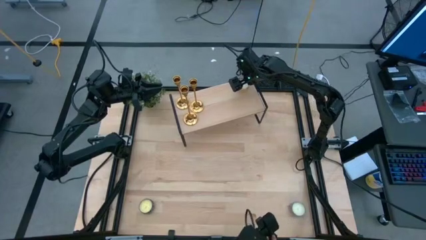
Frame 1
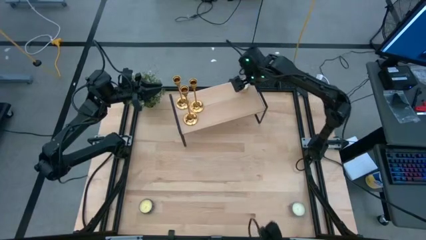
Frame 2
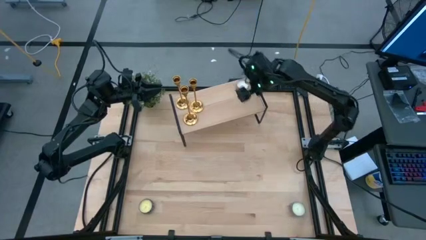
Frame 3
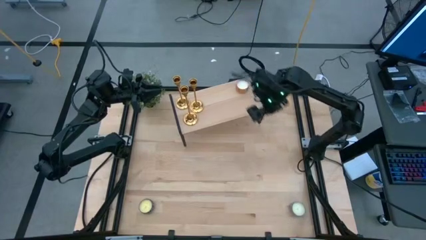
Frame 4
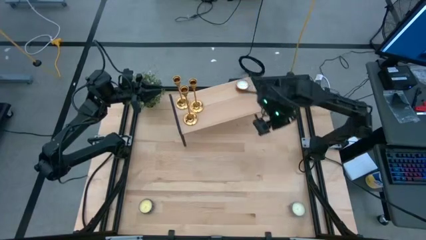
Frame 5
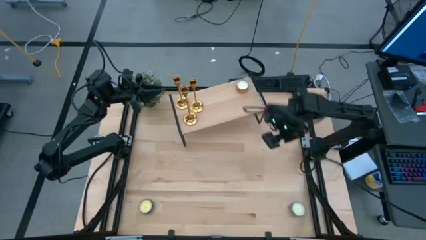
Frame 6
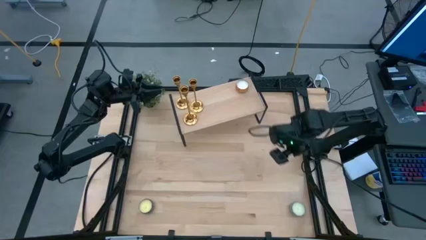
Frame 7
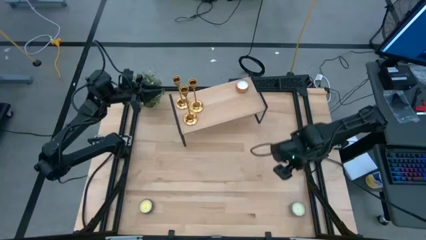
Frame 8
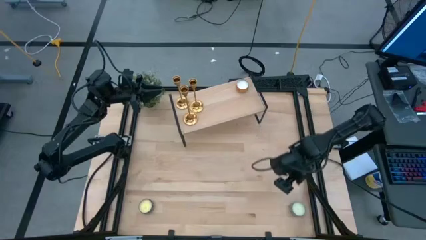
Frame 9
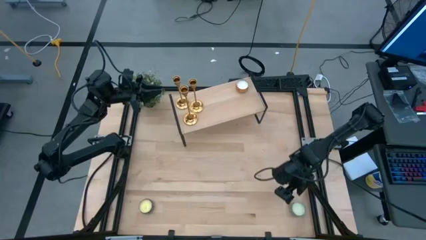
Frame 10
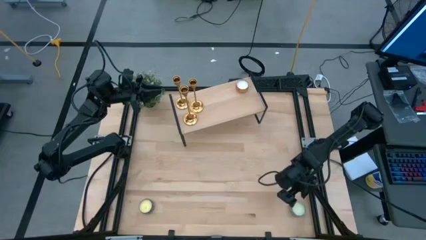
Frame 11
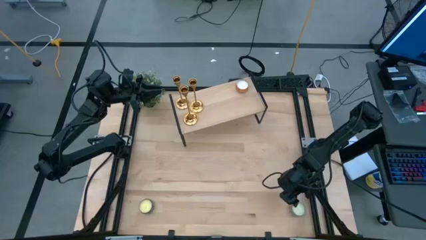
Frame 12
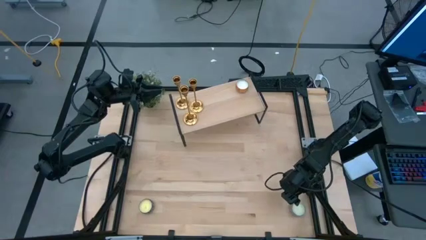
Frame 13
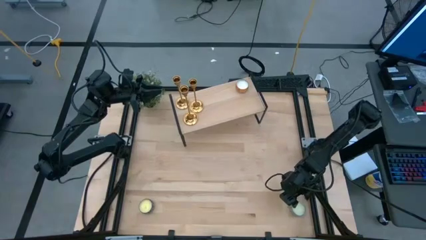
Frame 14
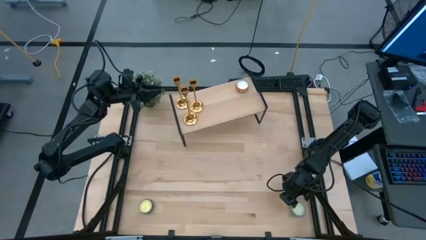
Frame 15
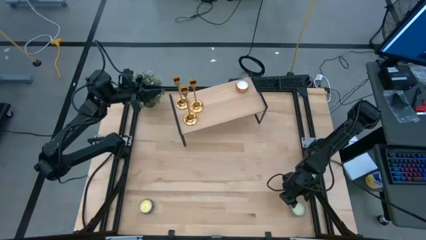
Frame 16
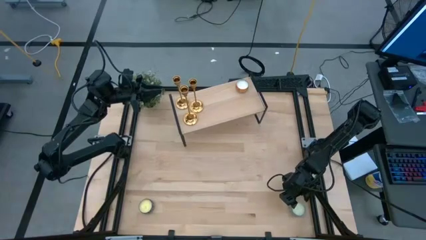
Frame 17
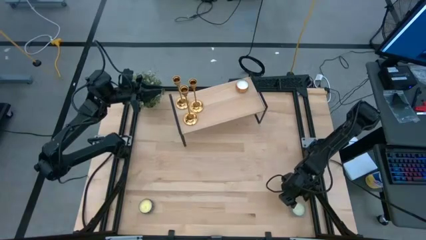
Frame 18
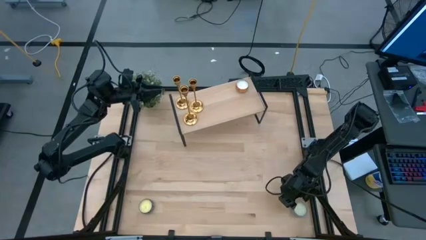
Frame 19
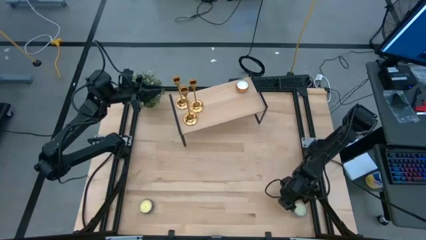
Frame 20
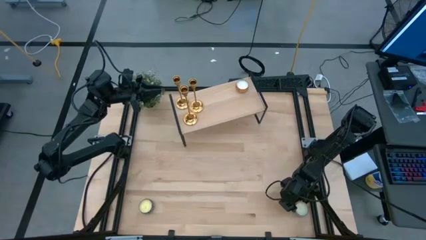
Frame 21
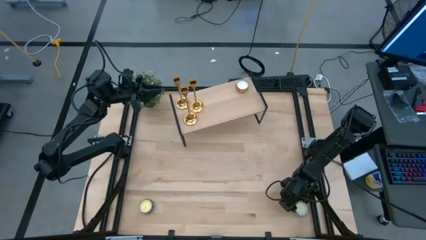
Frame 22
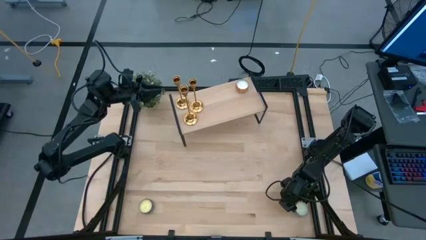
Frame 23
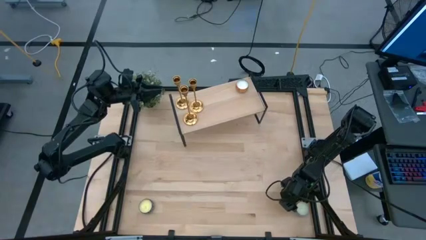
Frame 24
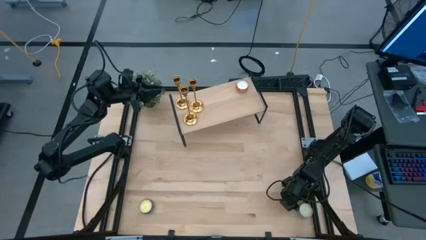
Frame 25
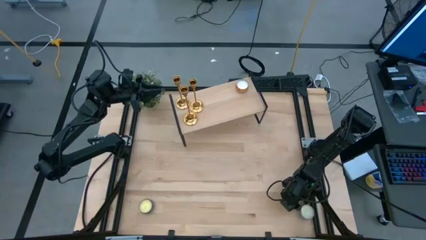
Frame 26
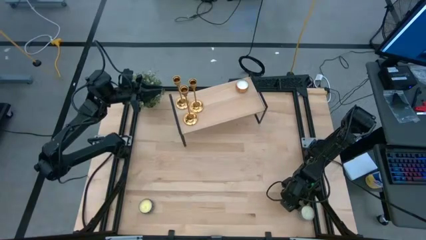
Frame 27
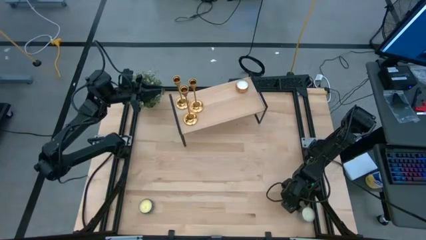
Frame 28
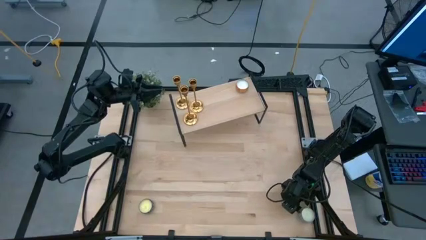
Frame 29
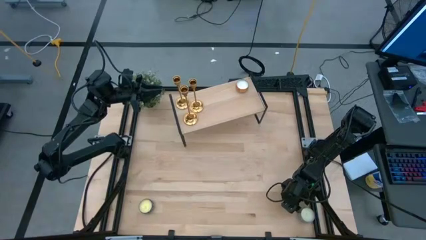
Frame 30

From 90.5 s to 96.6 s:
Task: Pick & Place candle stick holders
Put the blue scented candle on the shelf

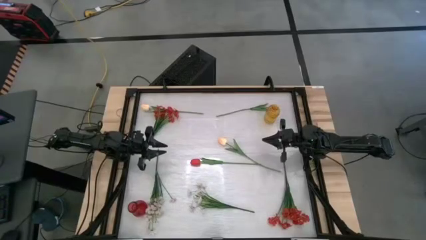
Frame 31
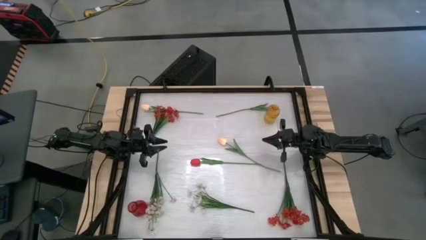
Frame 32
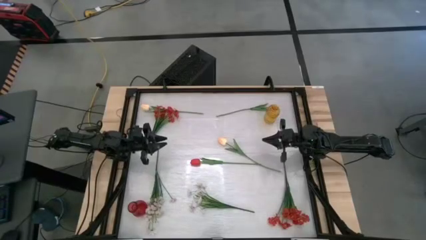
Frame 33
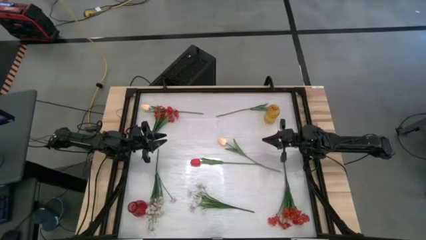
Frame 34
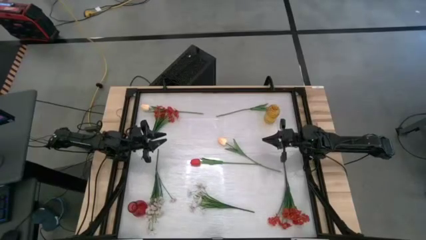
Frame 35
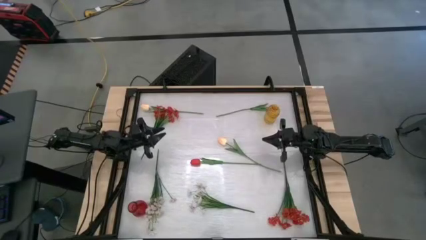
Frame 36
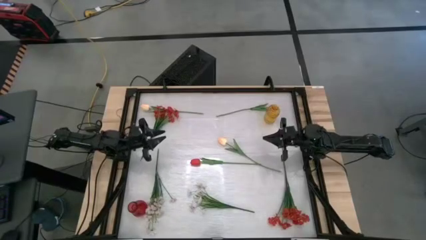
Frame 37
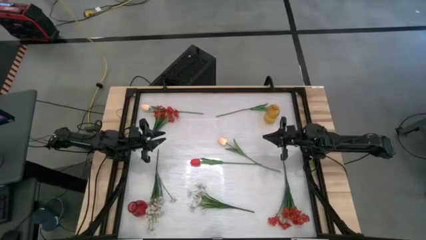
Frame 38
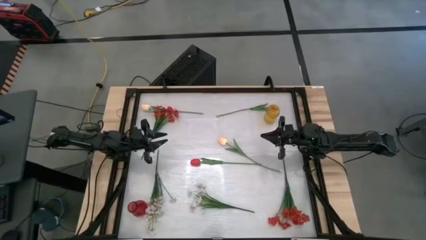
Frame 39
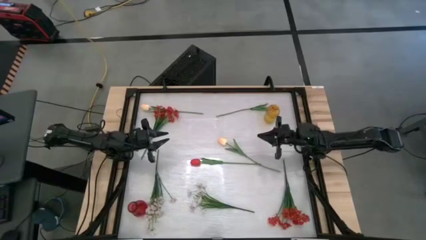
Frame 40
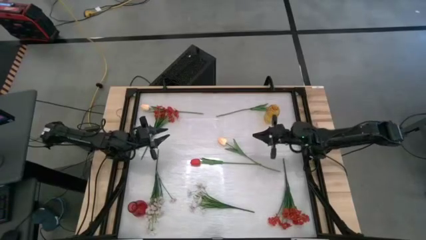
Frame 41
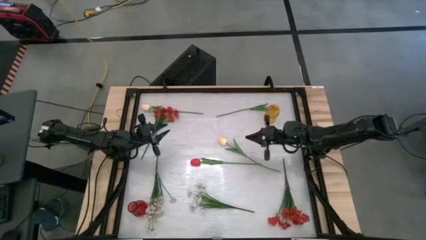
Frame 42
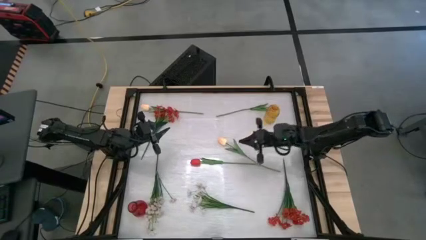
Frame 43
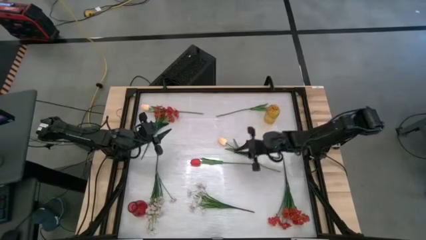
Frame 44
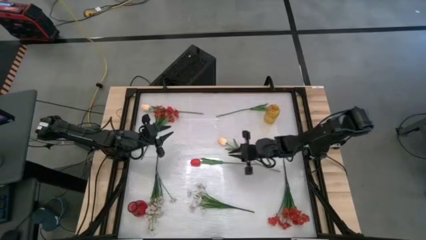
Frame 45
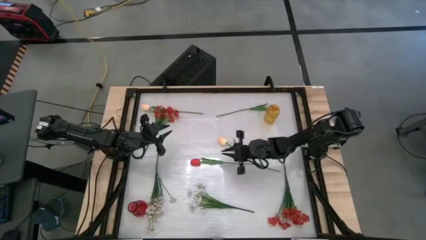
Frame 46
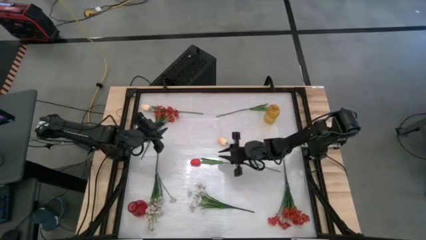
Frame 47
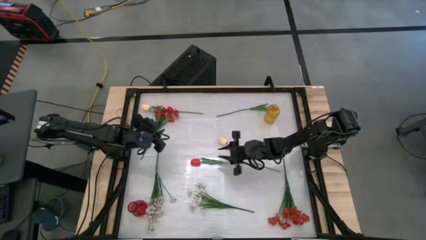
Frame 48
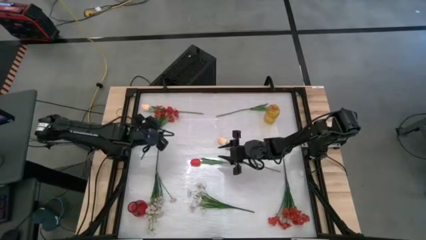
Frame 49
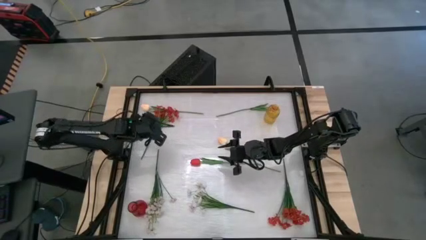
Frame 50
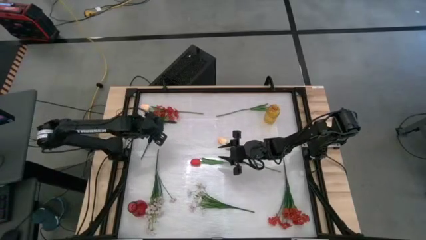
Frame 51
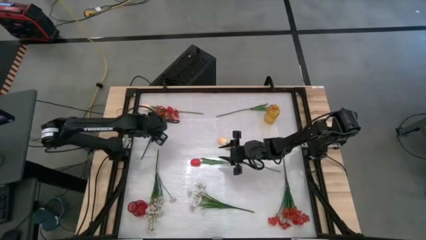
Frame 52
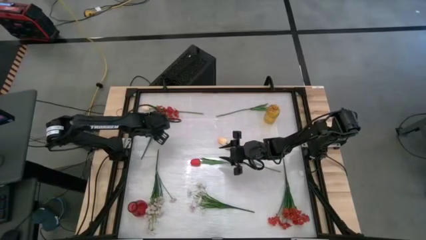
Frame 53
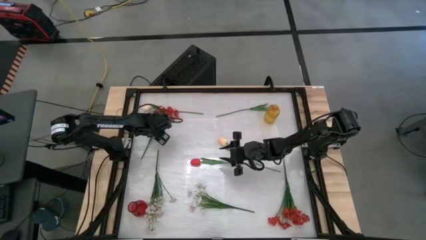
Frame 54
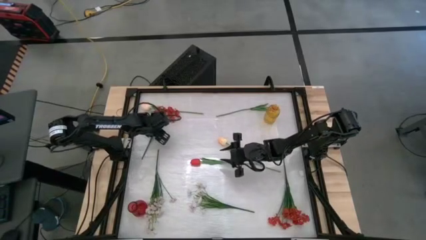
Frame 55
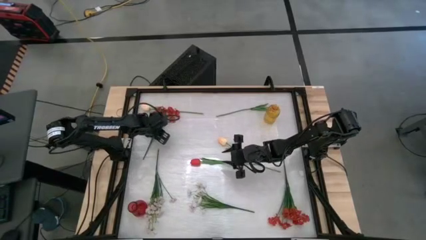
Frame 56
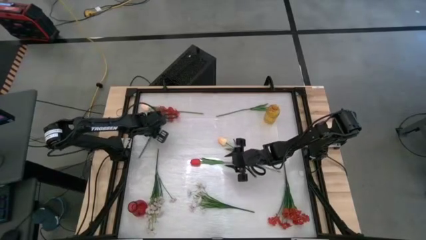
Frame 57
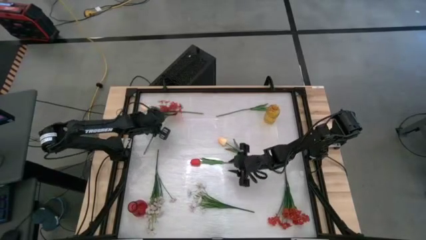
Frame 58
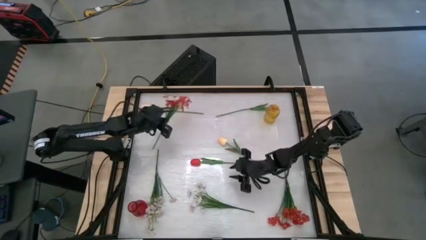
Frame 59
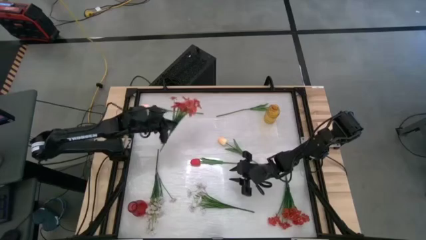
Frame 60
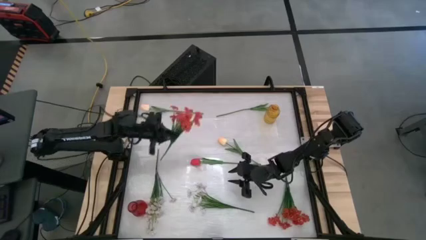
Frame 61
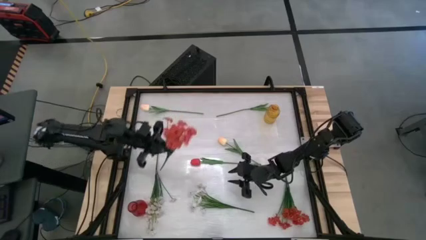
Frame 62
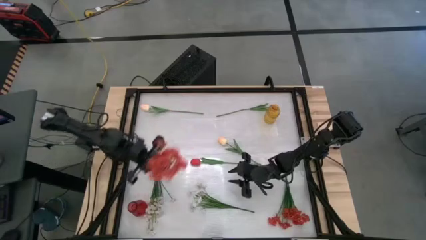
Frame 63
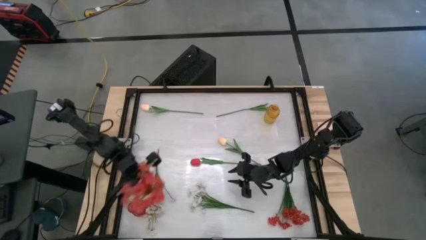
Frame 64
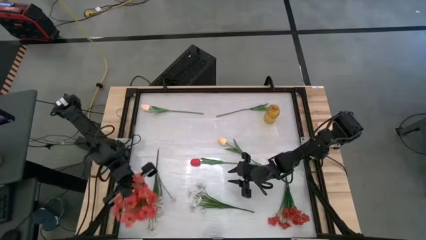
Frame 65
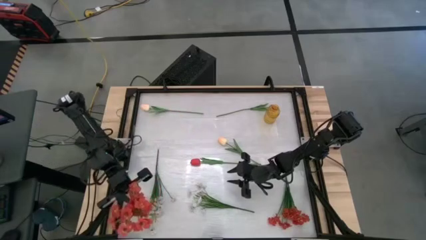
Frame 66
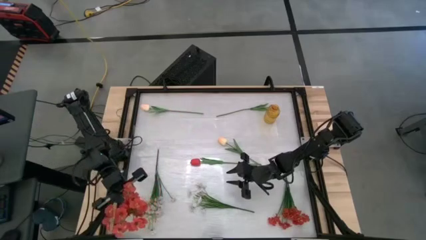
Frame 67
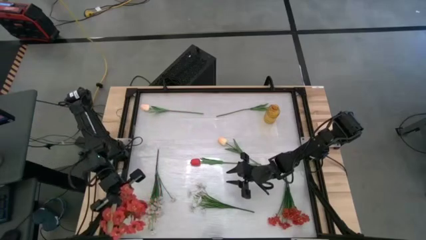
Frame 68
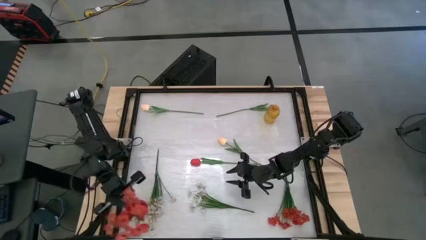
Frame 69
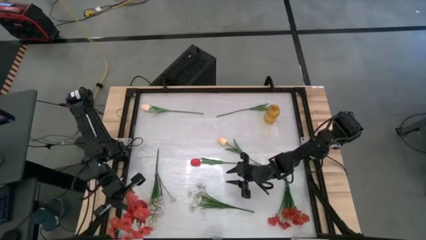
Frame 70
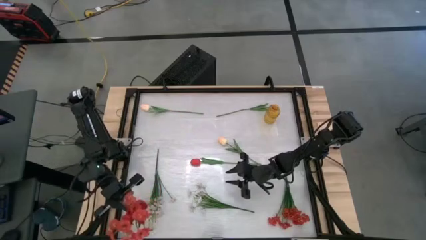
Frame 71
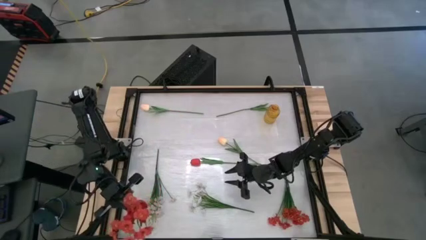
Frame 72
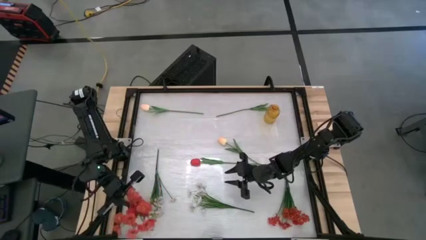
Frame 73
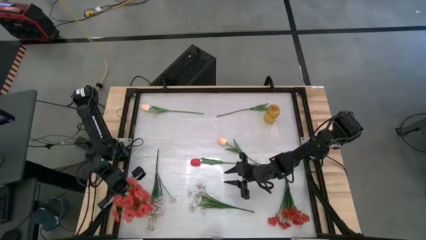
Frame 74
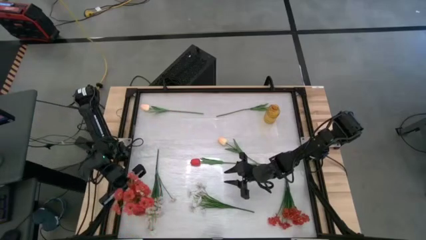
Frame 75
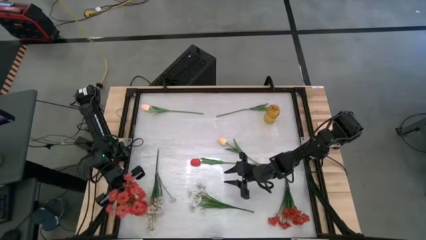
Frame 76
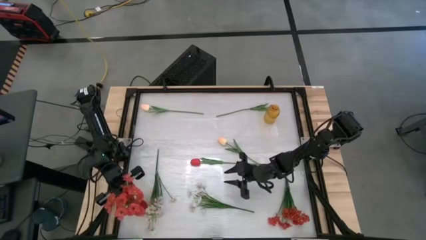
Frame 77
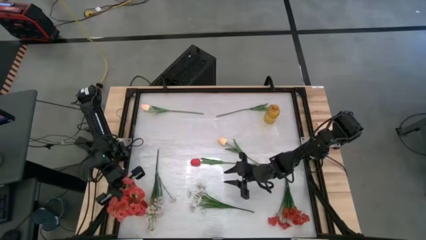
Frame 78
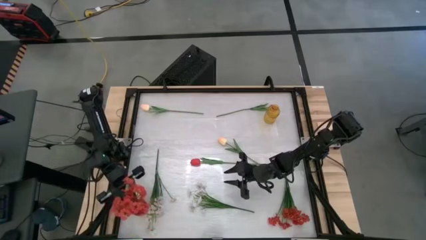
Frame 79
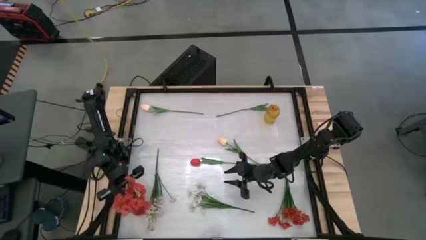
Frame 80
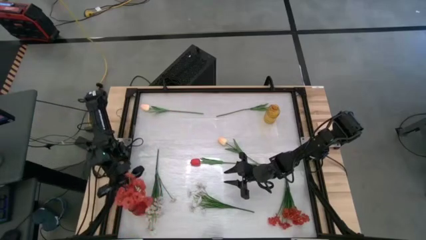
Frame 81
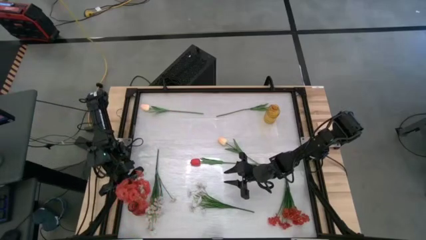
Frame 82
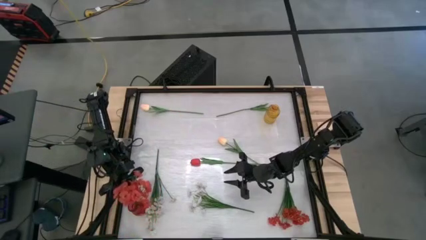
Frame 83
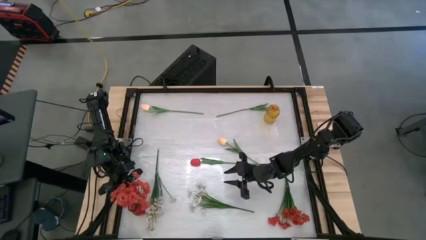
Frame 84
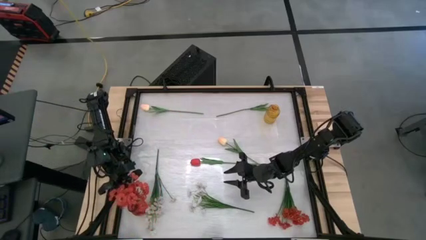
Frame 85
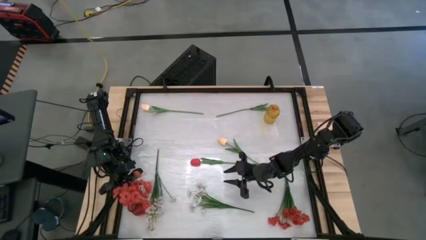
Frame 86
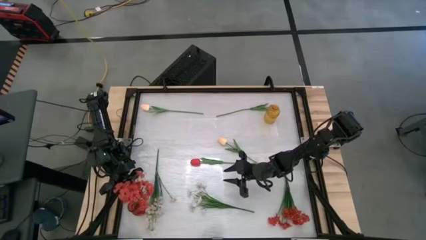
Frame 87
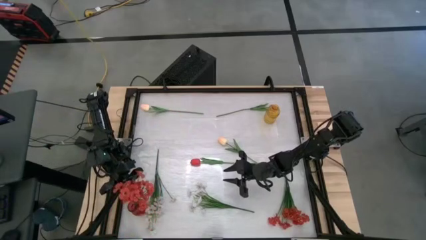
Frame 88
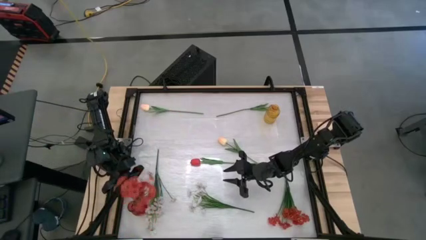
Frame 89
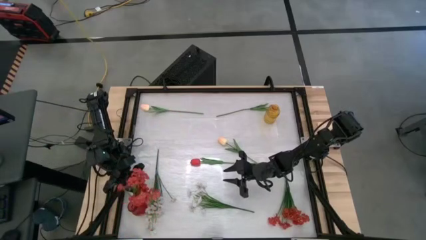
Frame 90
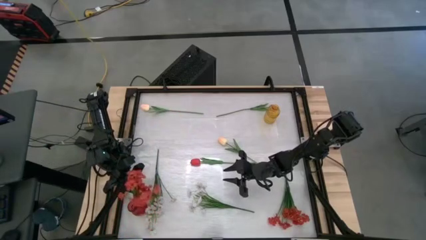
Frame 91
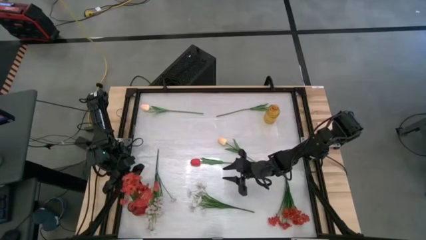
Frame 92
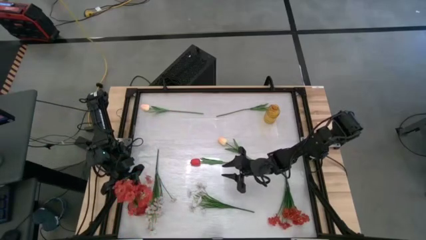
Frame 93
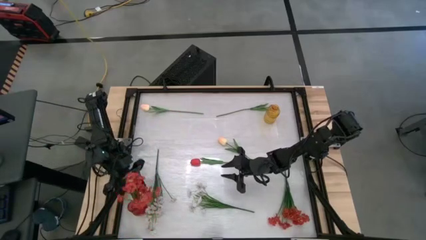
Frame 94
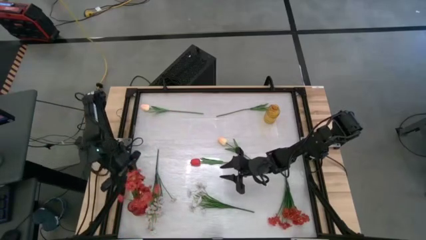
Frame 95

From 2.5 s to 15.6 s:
Task: Sort flowers into vase by color
Put the top red flowers into the red vase
